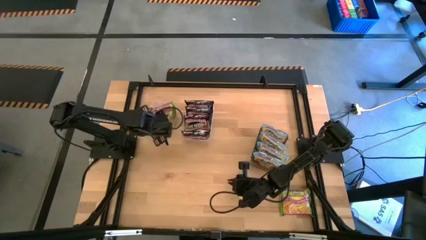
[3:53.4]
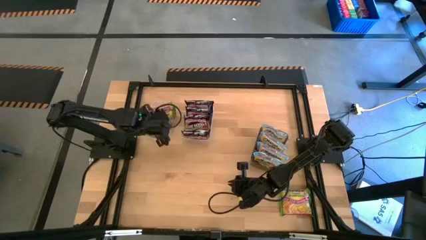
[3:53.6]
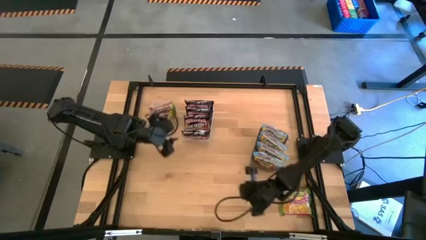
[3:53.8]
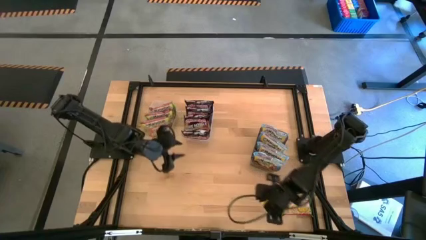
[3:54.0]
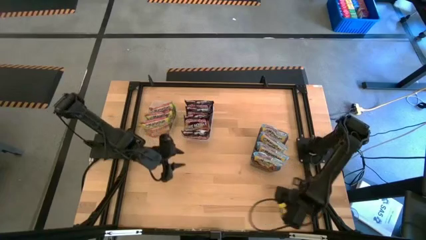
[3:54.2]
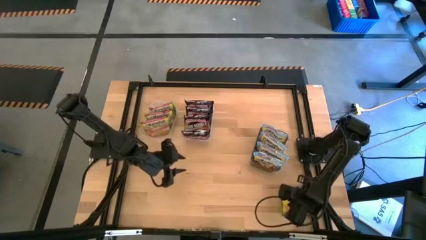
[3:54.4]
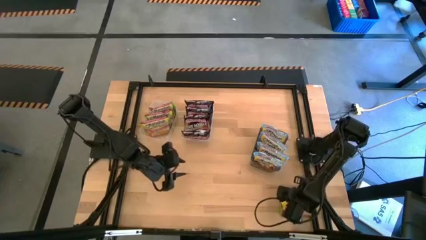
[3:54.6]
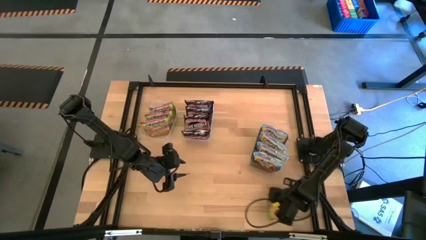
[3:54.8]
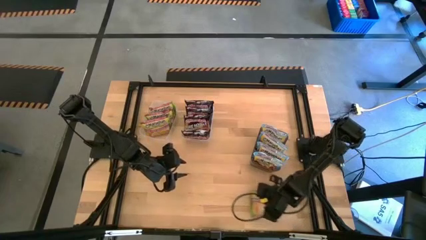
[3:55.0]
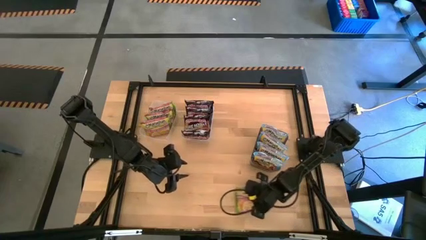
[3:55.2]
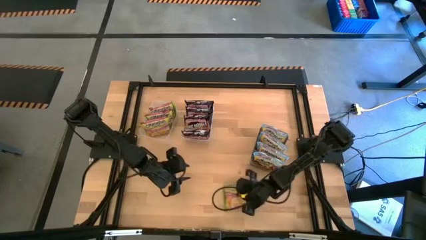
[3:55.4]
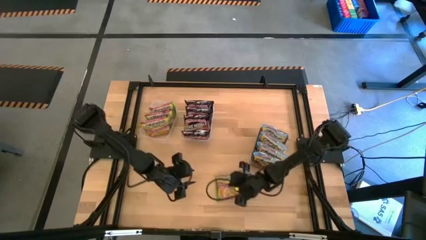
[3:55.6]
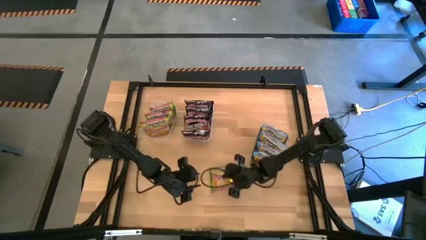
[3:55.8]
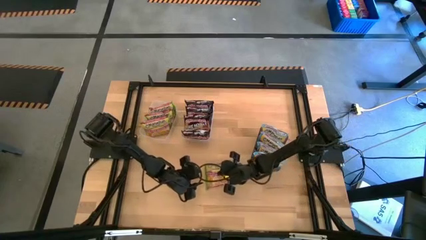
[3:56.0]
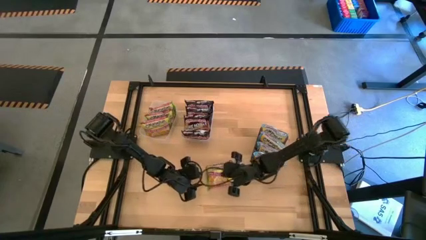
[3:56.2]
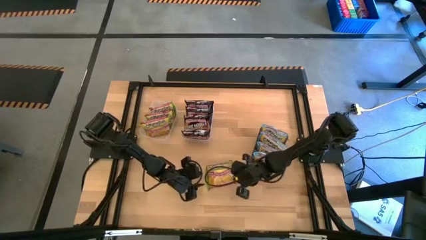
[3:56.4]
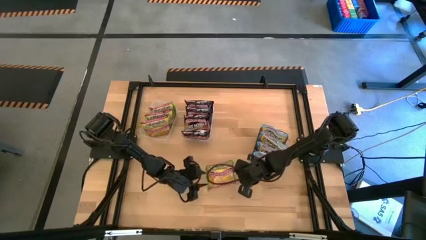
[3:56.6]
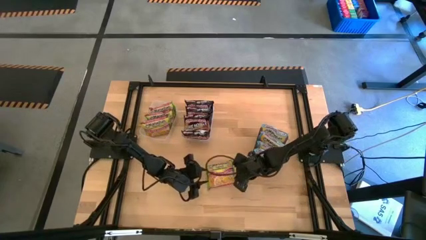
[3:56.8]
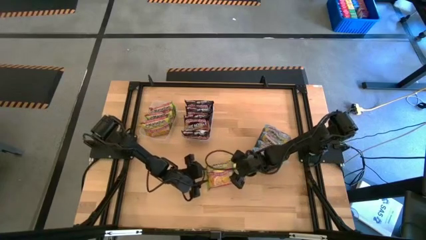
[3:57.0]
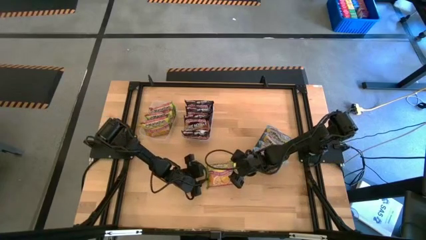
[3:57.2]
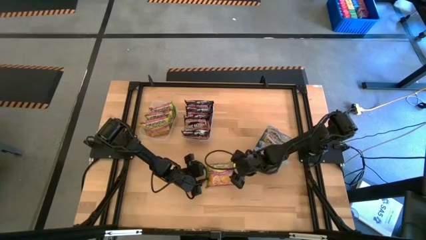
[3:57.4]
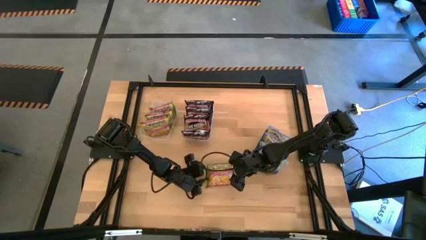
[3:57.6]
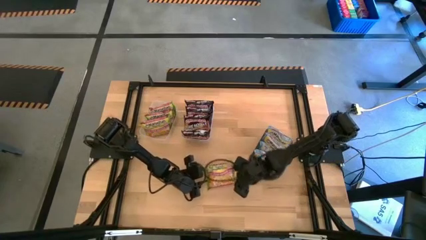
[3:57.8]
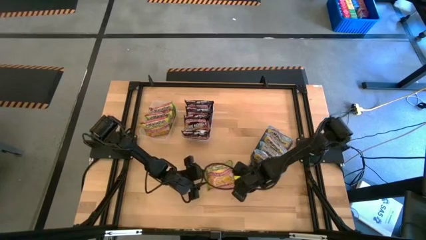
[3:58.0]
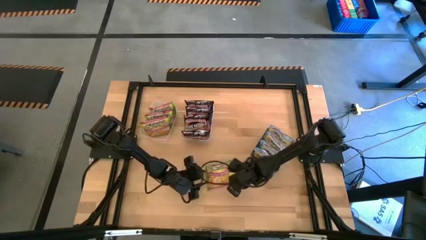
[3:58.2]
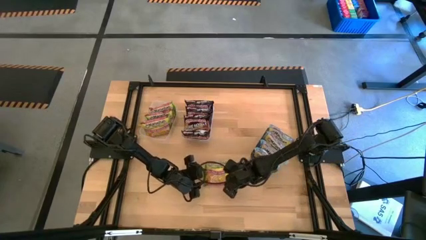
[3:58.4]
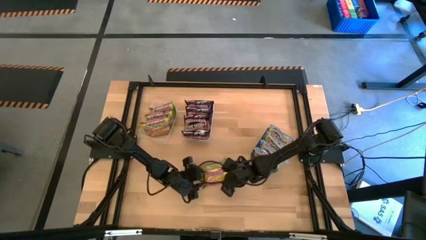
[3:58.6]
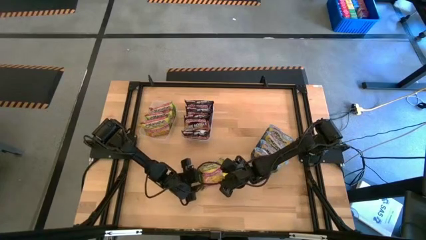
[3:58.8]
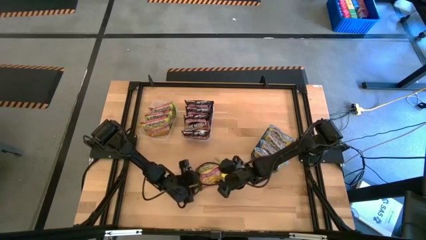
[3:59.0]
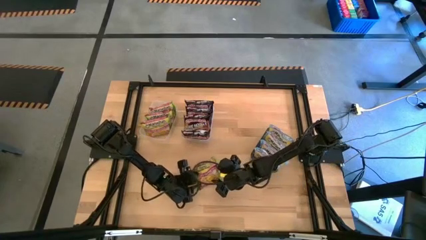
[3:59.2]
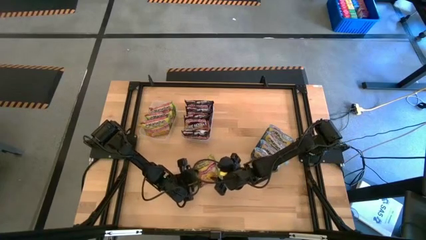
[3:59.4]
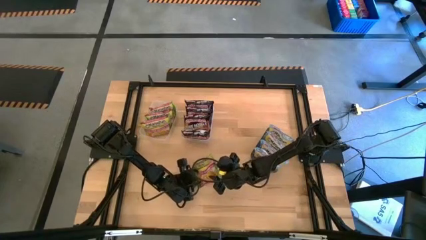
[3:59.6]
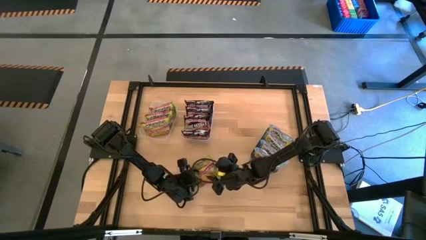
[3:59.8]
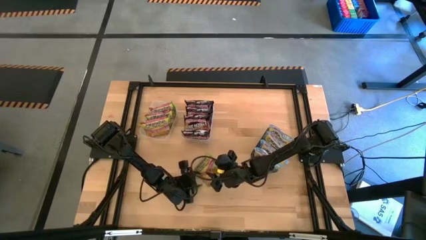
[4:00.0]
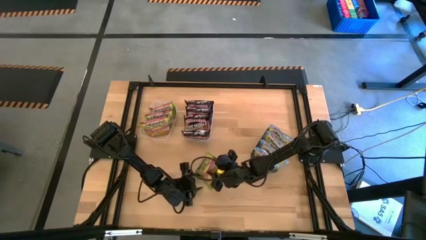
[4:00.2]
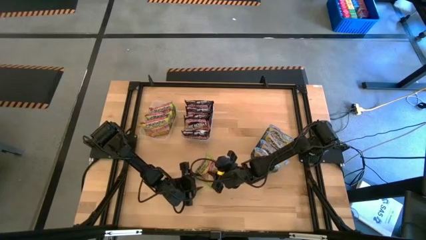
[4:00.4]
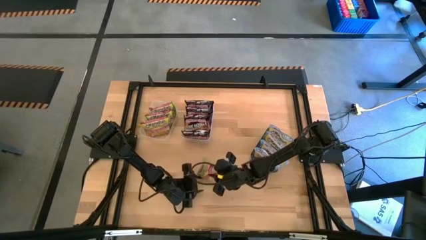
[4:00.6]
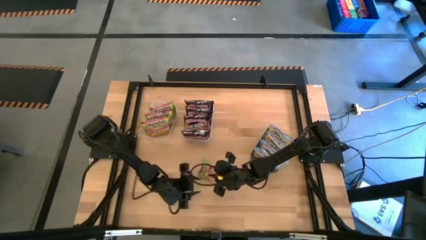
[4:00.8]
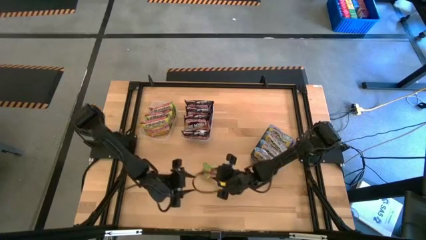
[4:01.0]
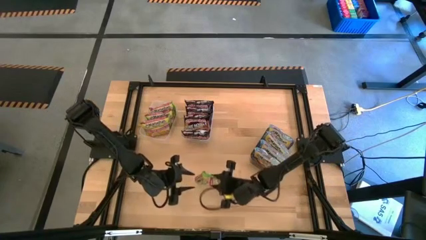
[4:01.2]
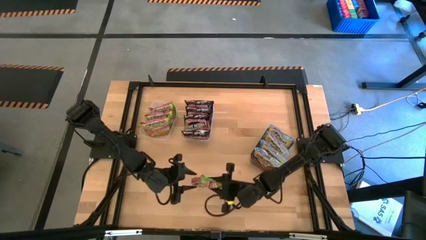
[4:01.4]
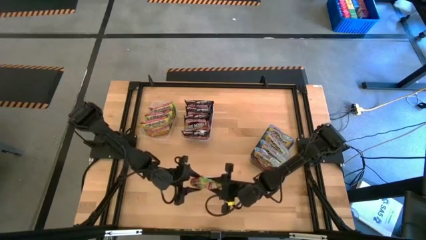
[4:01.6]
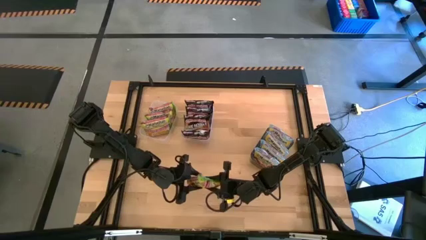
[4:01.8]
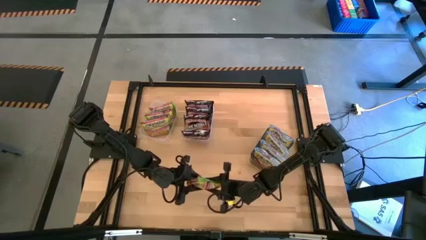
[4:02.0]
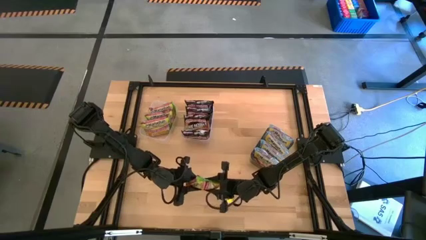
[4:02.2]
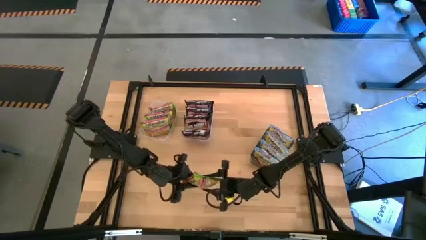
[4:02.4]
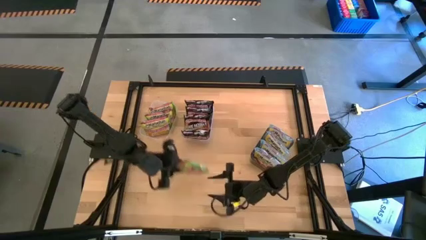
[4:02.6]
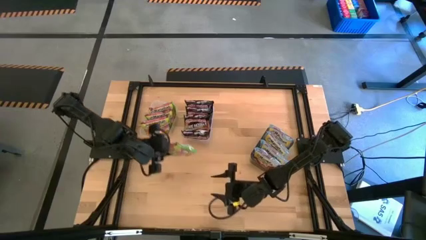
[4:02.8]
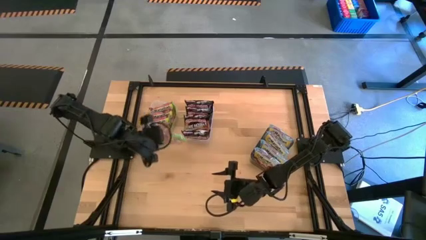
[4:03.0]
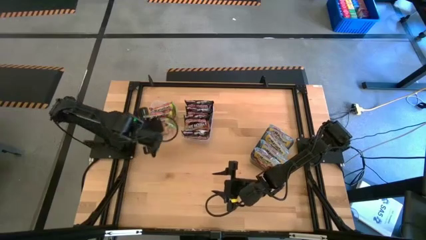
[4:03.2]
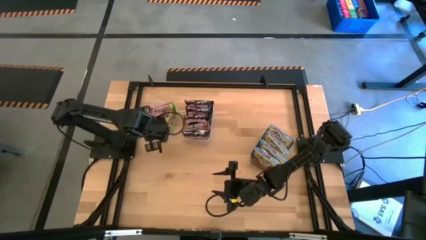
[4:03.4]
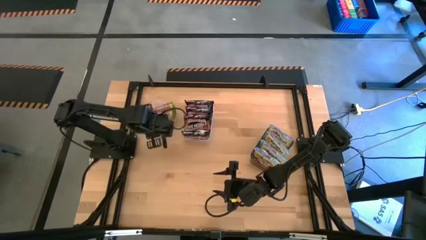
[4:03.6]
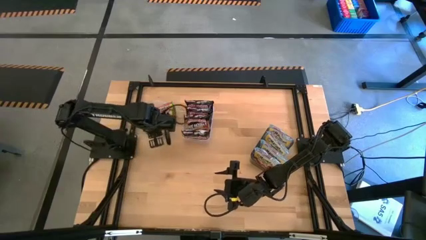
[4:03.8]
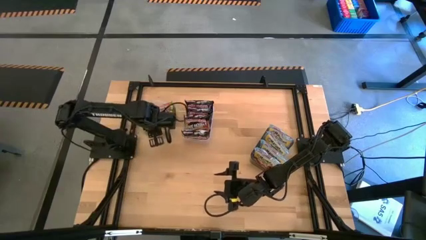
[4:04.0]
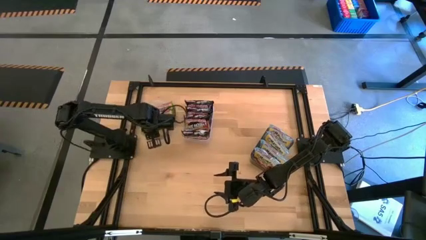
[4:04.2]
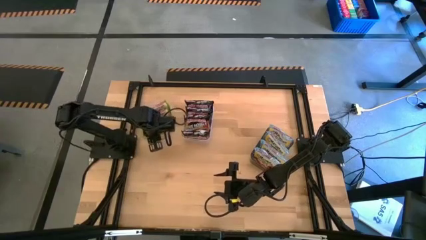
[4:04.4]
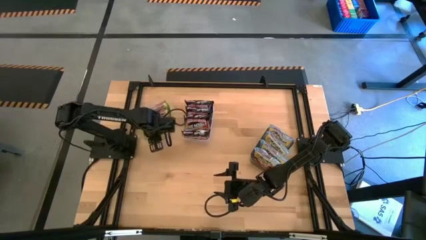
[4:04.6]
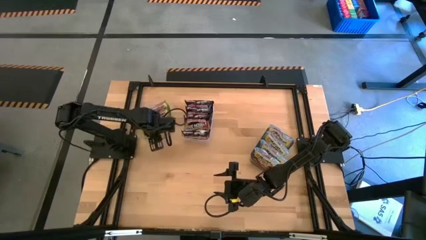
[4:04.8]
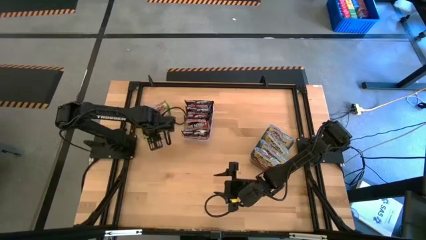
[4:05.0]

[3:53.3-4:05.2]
Task: Sort Maruchan noodles
Put the green noodle pack into the left transparent bin

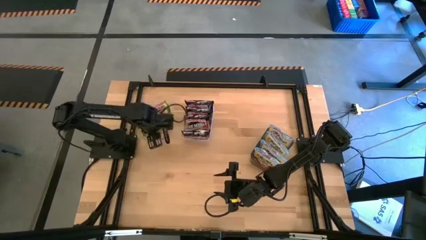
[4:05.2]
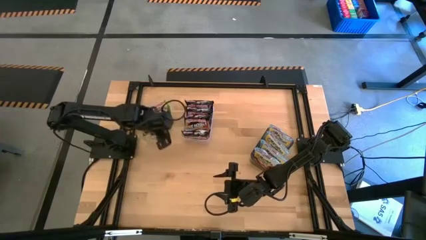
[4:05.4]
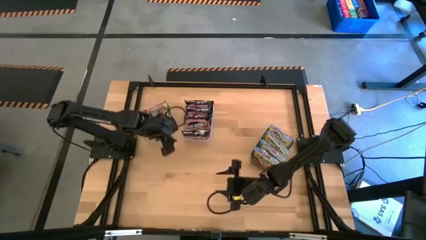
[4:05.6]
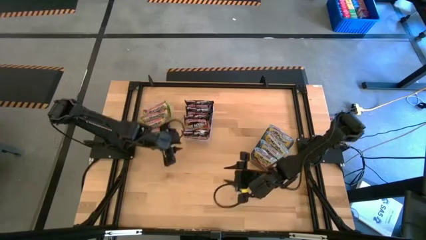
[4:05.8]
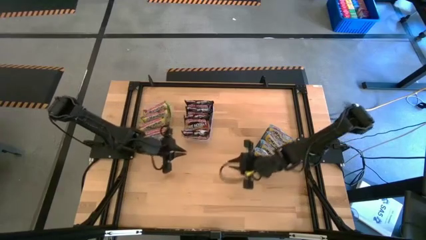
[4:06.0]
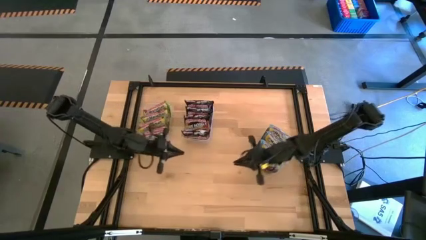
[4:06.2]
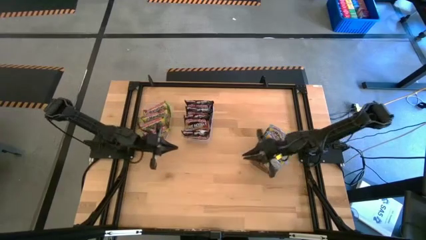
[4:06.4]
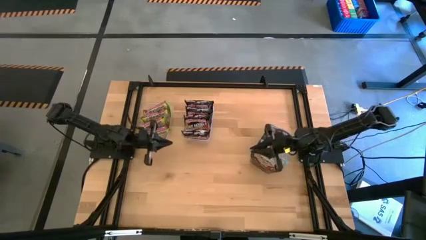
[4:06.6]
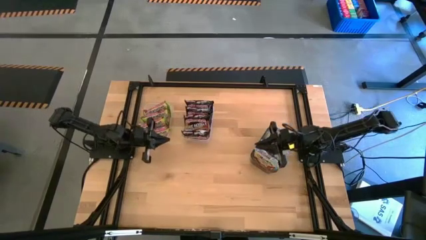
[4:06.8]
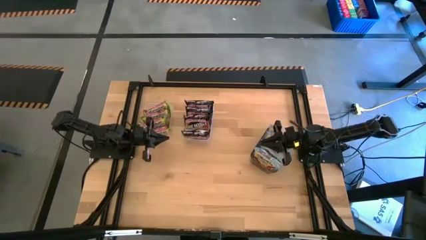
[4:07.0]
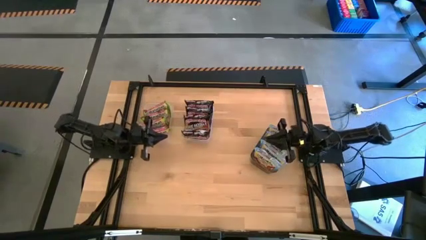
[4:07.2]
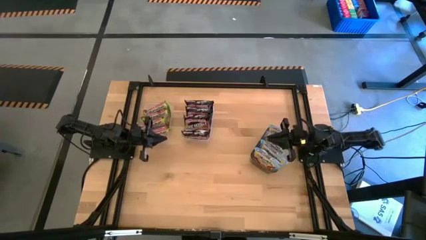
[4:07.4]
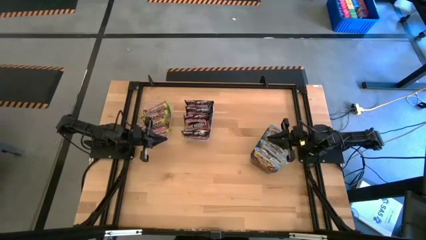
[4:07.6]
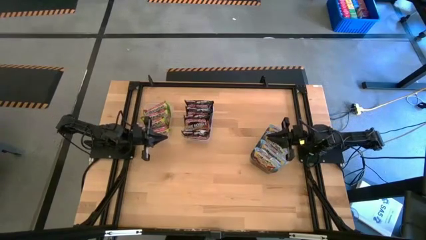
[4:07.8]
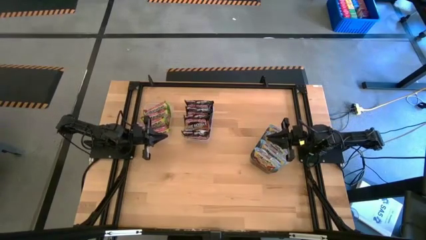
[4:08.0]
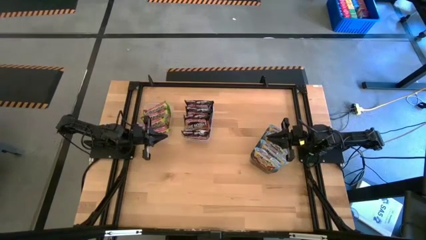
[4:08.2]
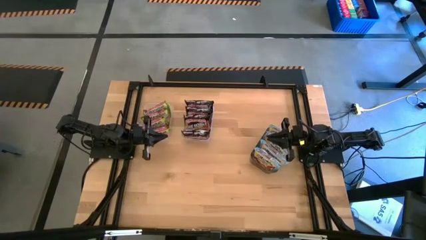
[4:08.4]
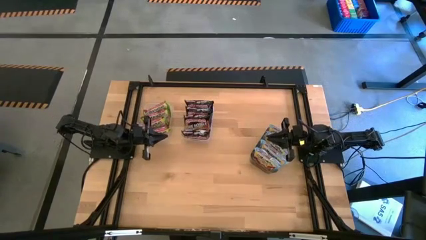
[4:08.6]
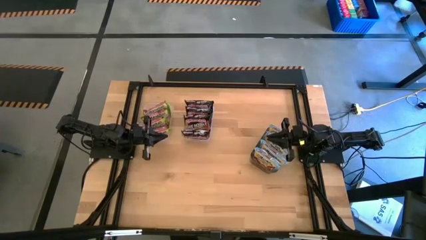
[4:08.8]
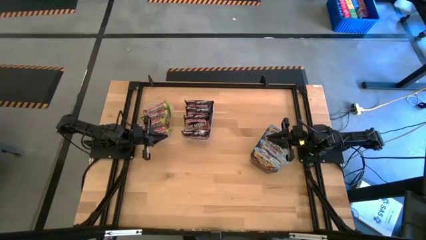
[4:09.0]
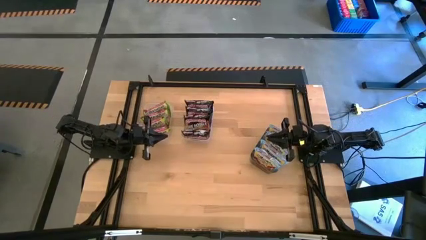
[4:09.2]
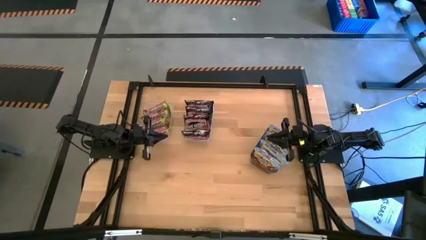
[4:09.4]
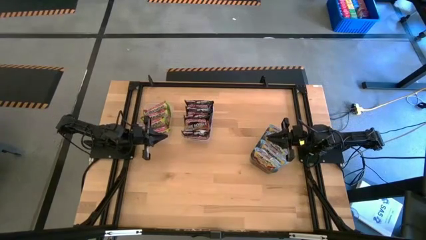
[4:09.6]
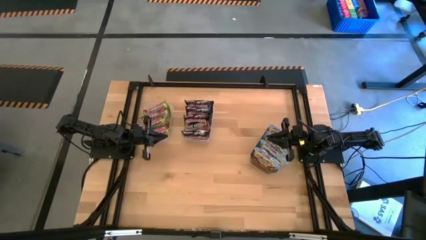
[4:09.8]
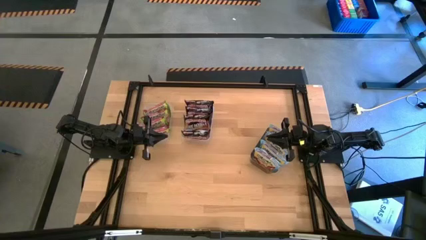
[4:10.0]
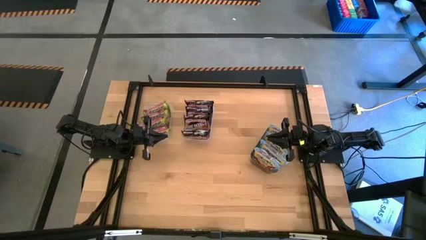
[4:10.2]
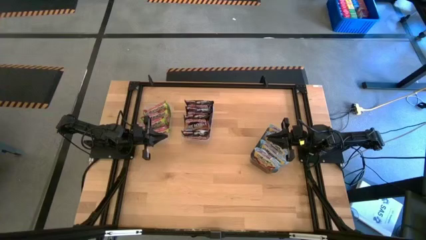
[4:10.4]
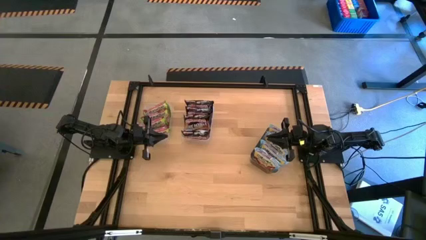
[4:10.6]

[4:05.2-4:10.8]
Return to Home Position
